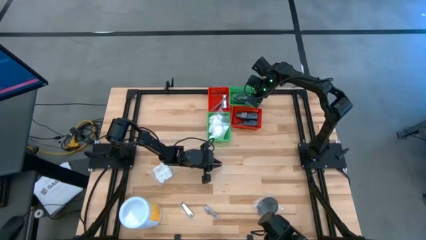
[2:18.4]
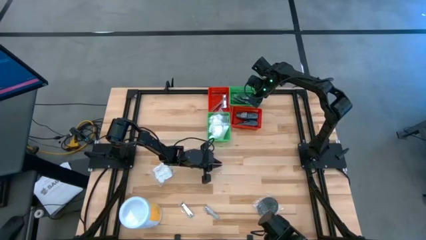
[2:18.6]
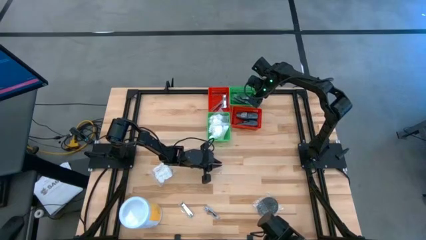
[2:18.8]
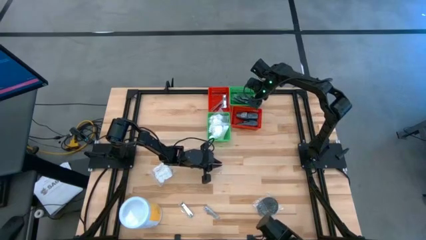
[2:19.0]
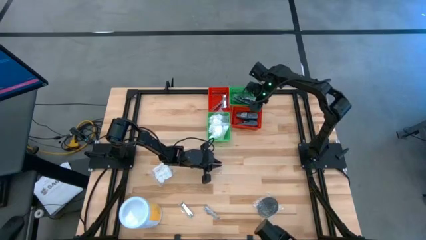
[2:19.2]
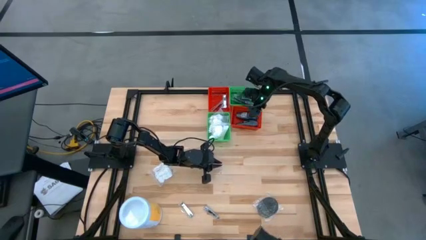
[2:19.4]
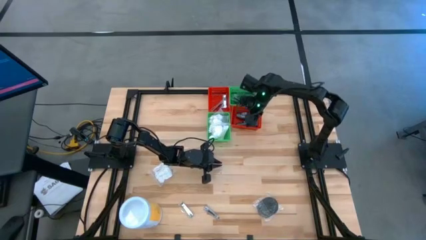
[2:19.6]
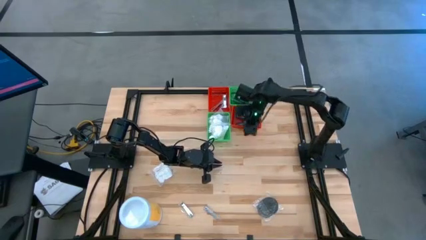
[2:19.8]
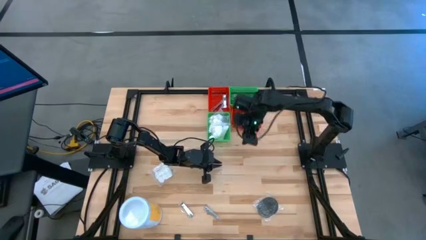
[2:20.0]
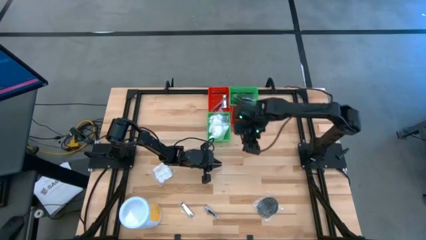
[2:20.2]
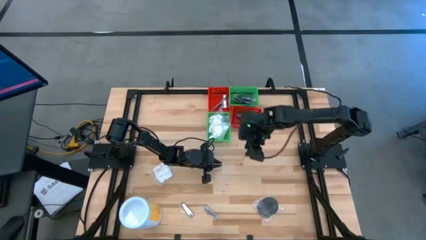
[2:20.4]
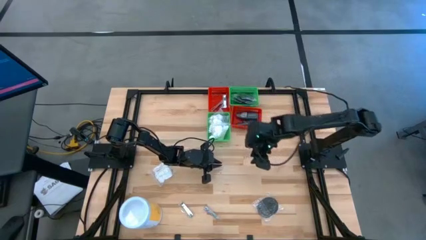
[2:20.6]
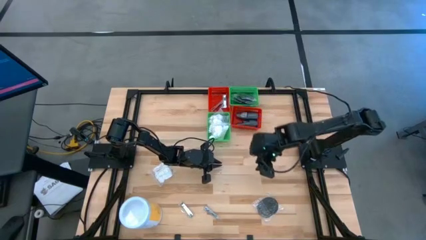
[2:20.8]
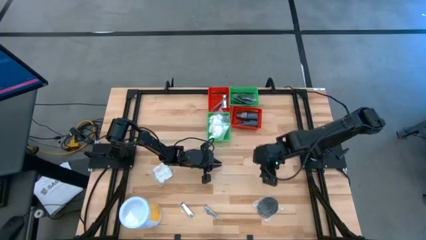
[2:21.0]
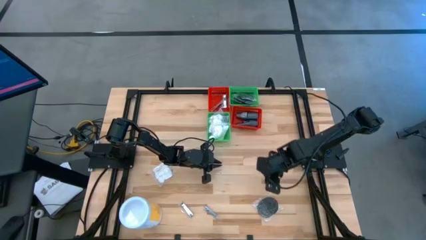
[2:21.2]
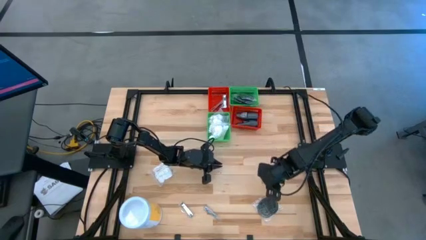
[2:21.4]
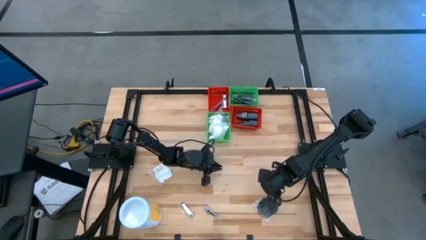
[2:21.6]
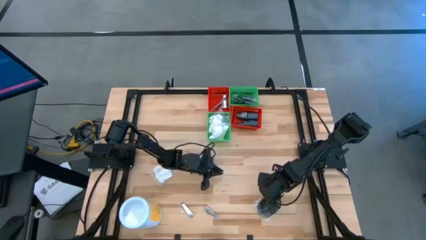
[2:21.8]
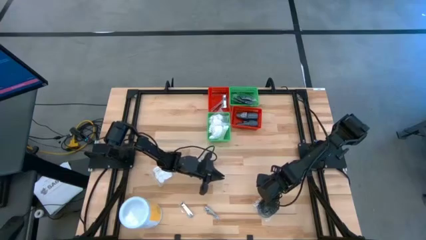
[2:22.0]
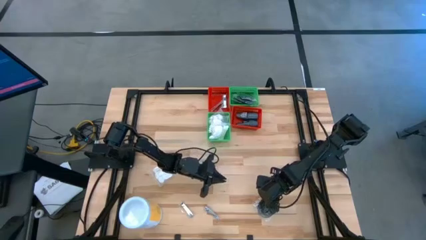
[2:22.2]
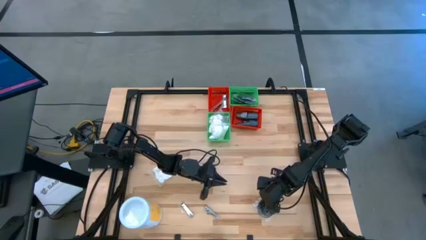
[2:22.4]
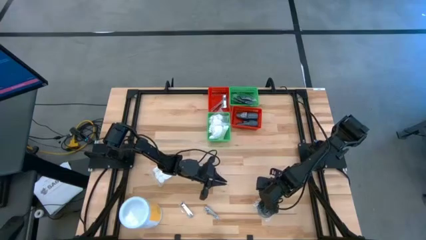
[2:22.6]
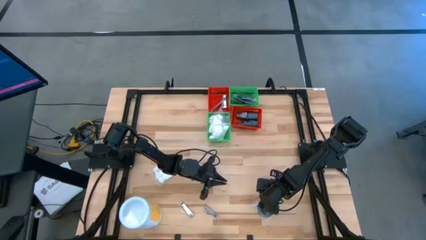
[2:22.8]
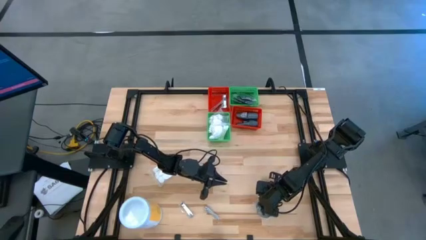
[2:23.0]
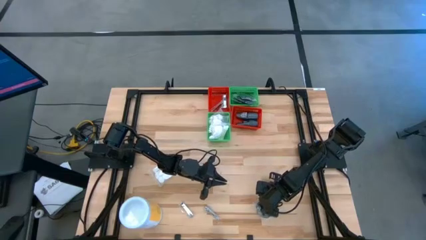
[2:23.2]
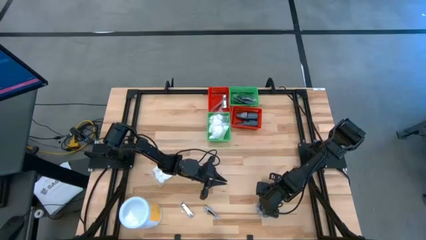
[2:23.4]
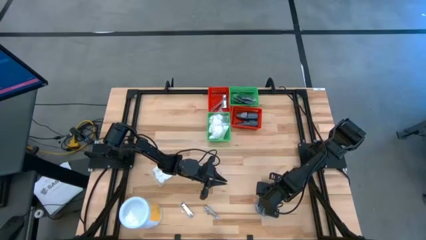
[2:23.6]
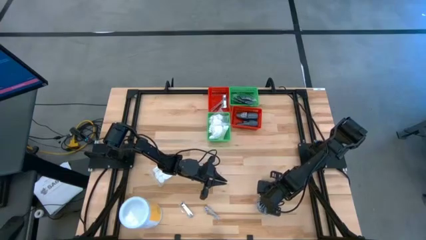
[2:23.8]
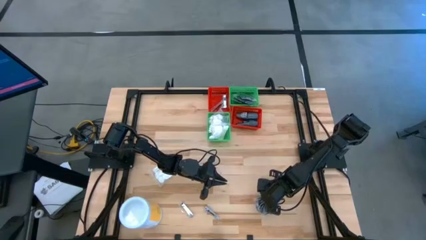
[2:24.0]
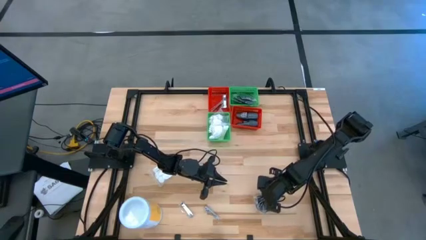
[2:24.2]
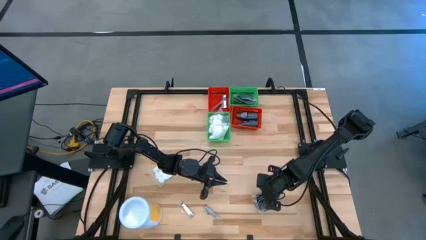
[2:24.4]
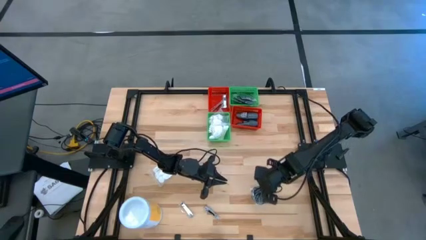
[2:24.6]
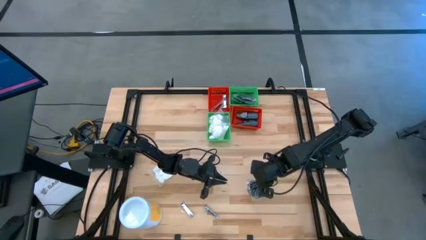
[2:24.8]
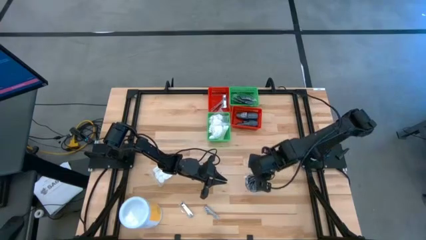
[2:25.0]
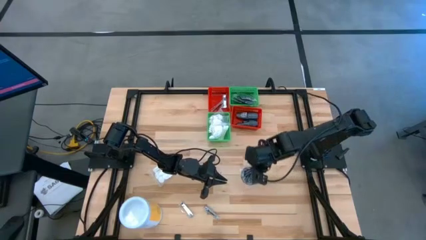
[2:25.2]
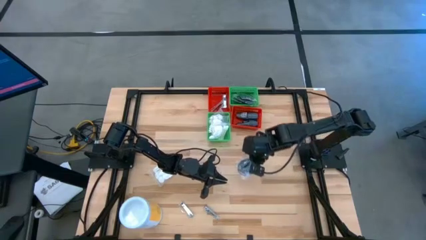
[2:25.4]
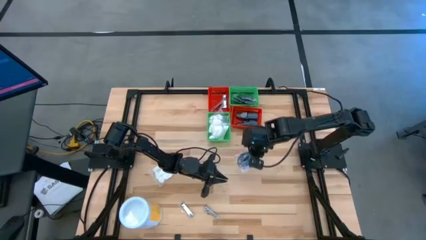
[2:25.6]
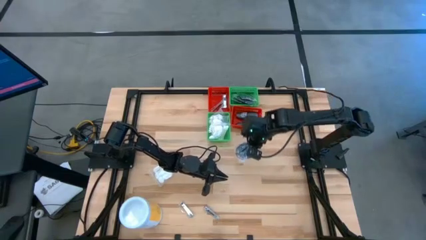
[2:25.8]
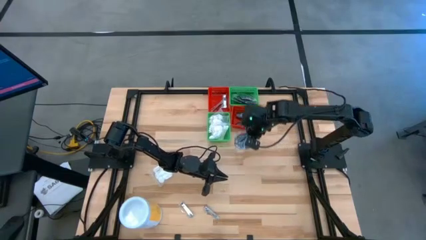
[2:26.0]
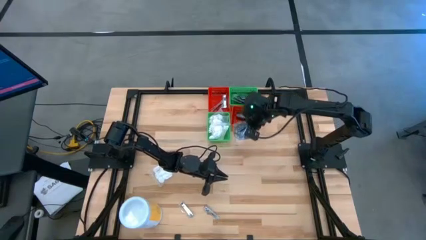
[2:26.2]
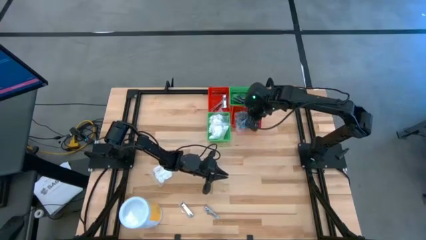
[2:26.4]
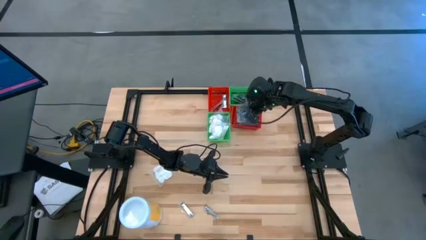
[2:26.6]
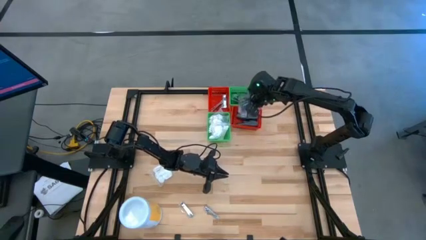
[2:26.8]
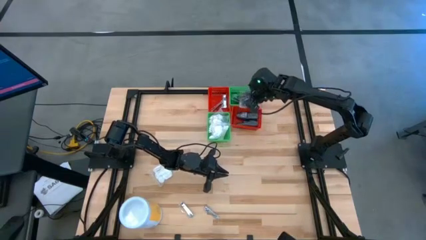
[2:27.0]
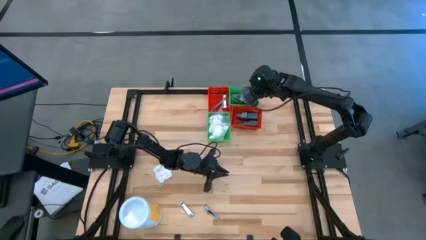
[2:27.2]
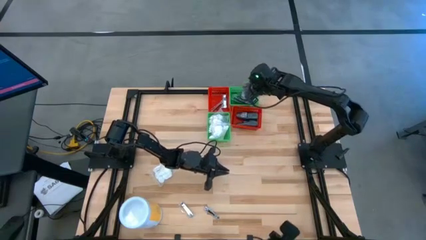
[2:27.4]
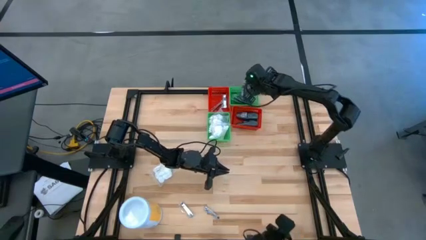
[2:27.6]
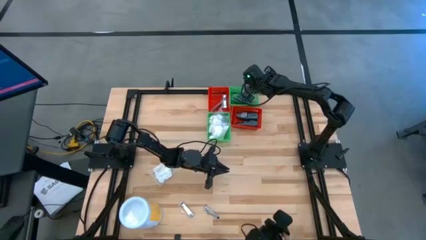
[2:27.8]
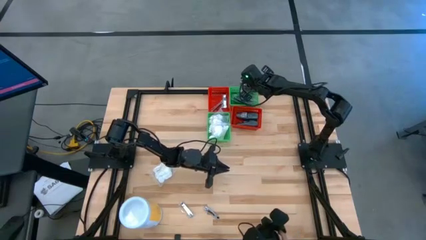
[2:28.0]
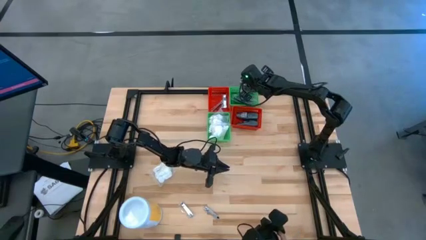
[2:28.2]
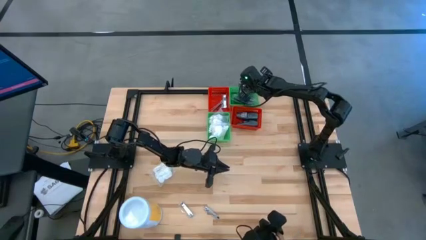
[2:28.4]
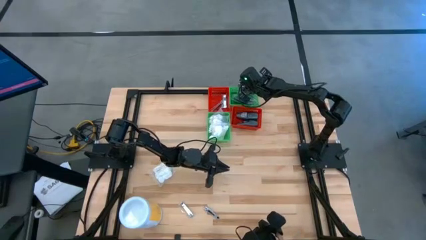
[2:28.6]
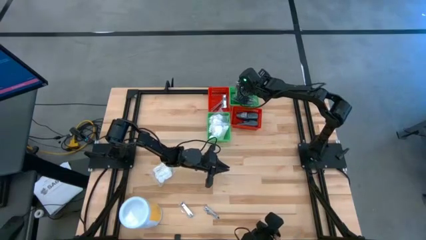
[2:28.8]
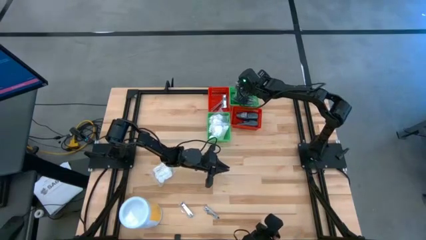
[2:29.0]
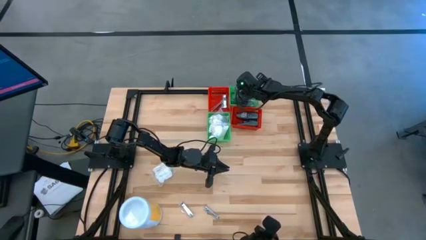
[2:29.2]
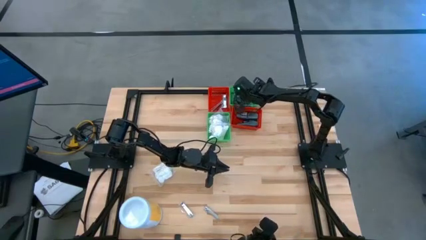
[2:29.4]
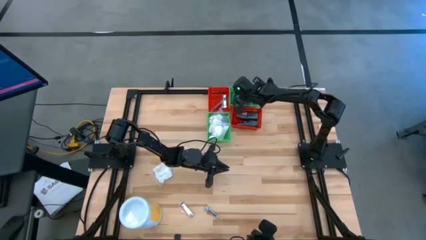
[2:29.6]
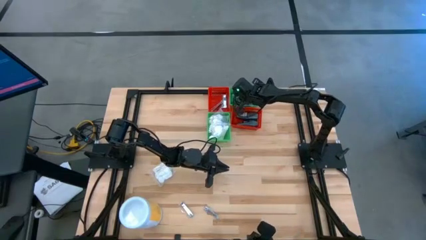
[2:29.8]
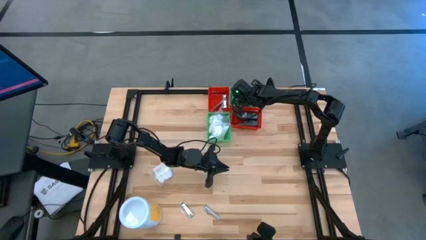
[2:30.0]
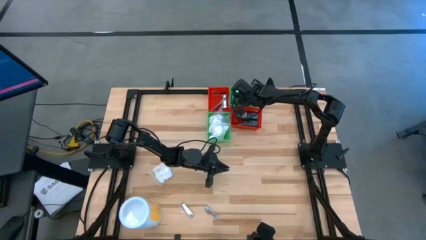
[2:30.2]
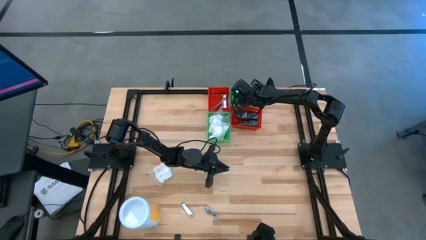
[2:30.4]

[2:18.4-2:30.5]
Task: Pick & Place Travel size toiletries
Put the hairbrush into the right green bin
